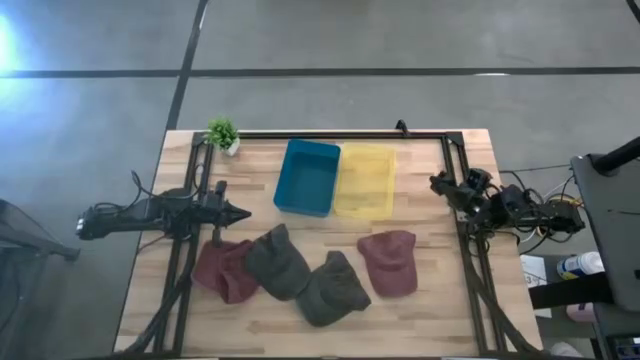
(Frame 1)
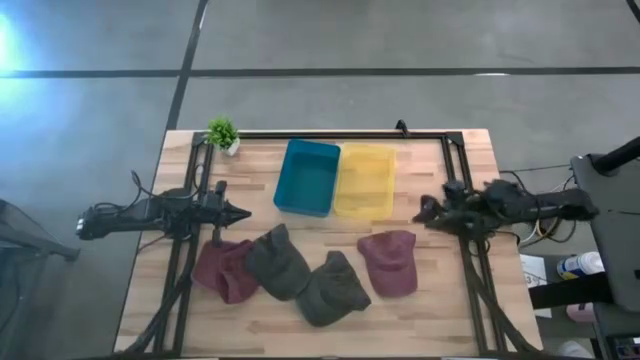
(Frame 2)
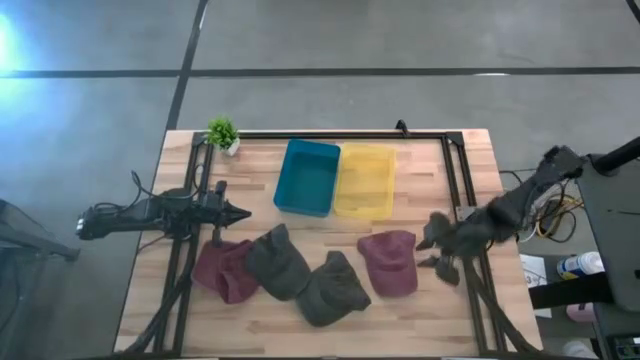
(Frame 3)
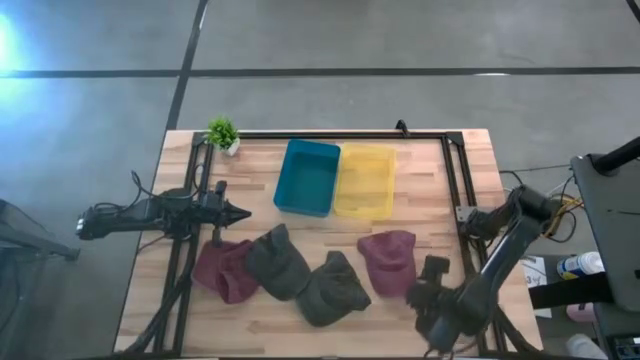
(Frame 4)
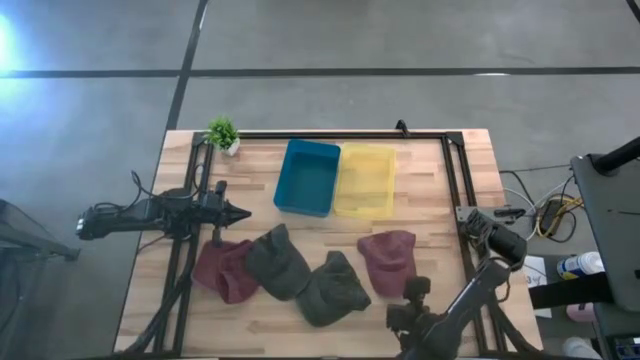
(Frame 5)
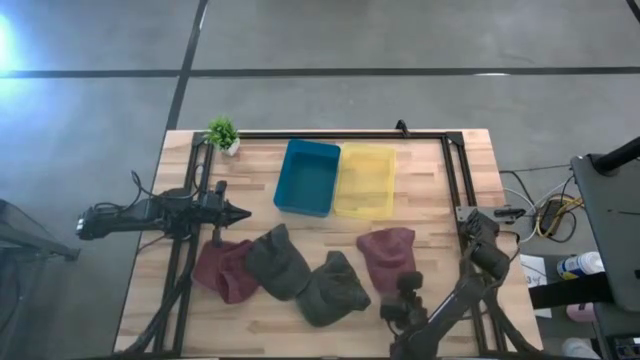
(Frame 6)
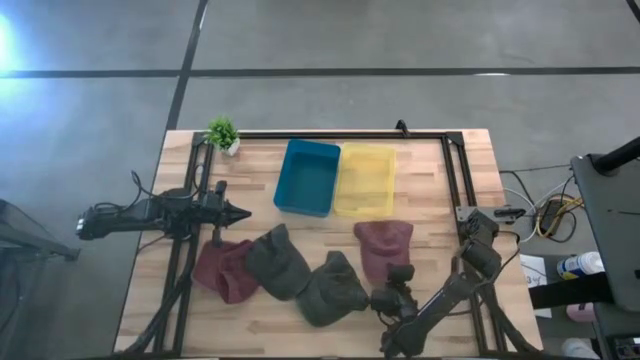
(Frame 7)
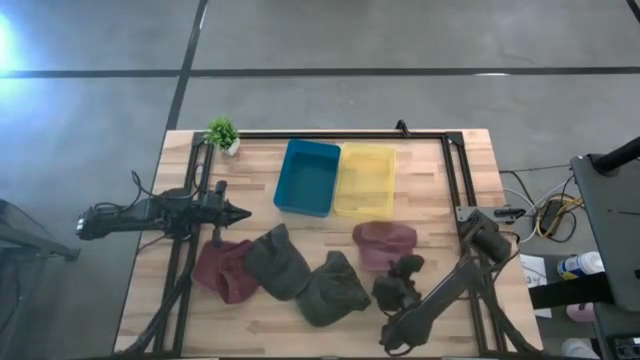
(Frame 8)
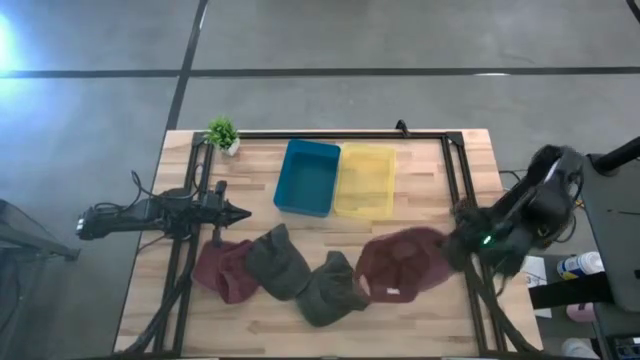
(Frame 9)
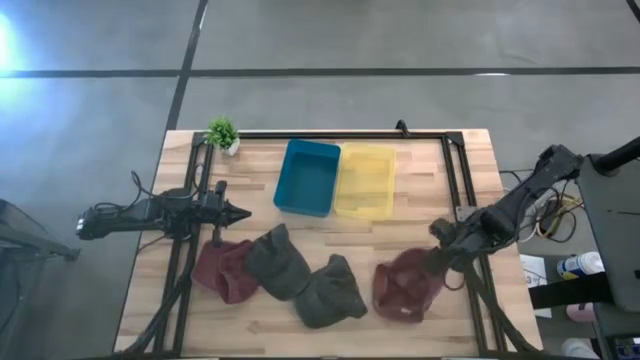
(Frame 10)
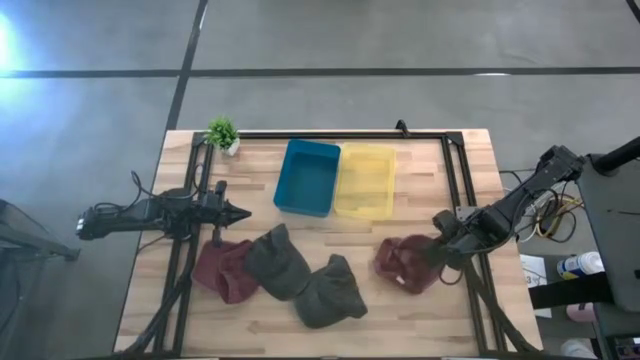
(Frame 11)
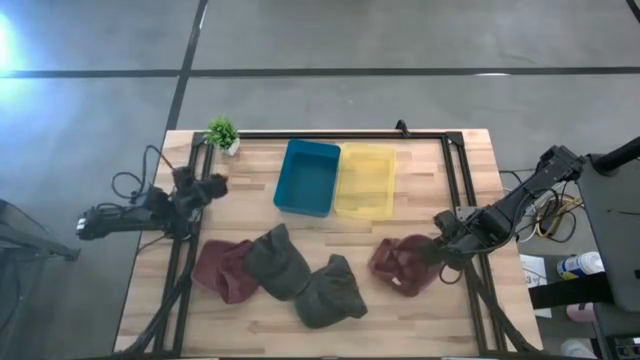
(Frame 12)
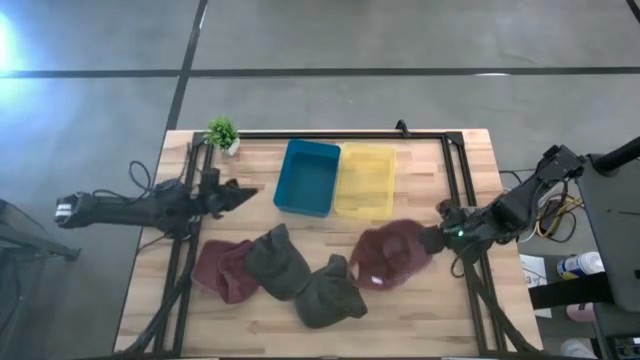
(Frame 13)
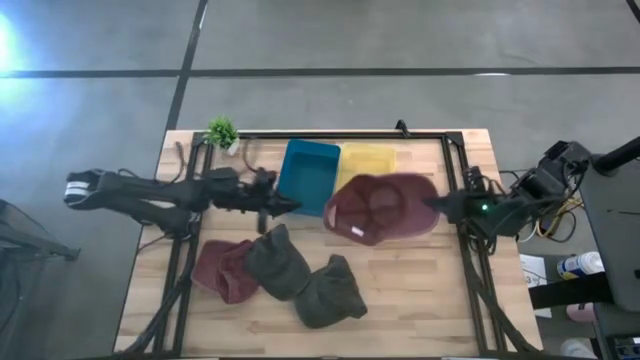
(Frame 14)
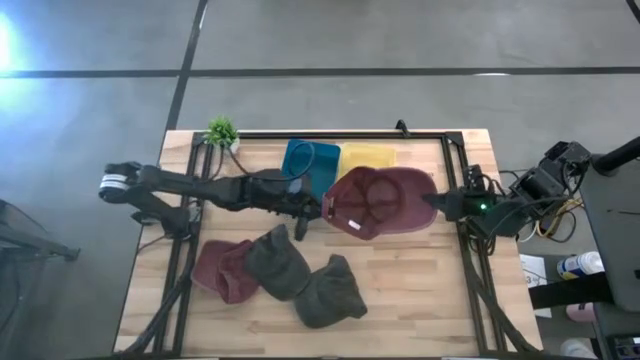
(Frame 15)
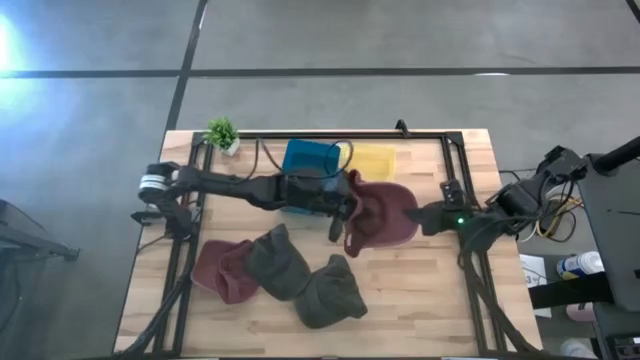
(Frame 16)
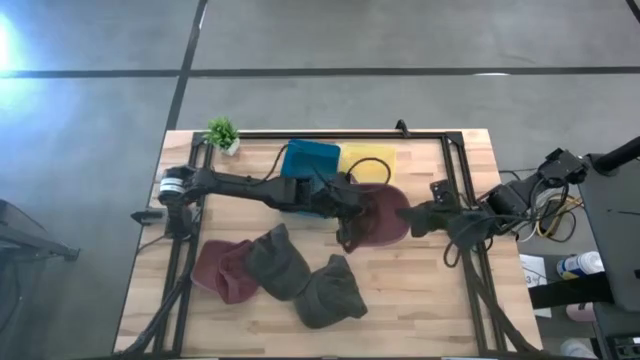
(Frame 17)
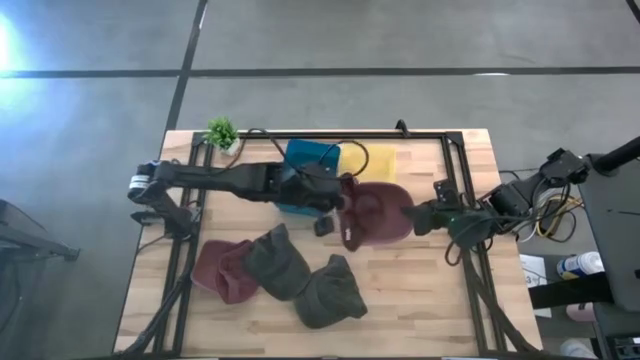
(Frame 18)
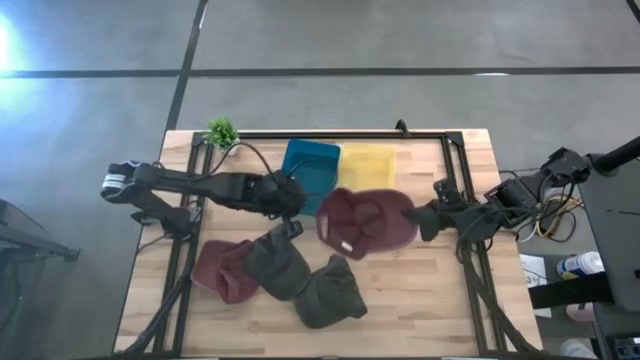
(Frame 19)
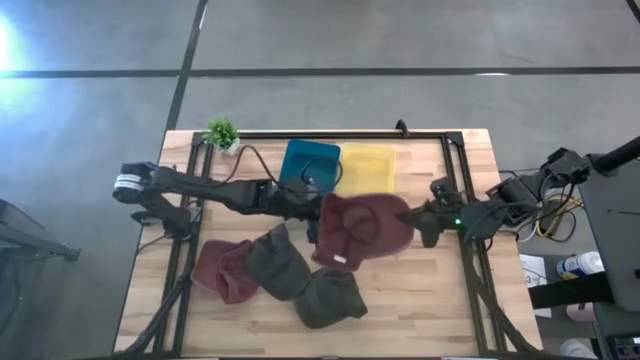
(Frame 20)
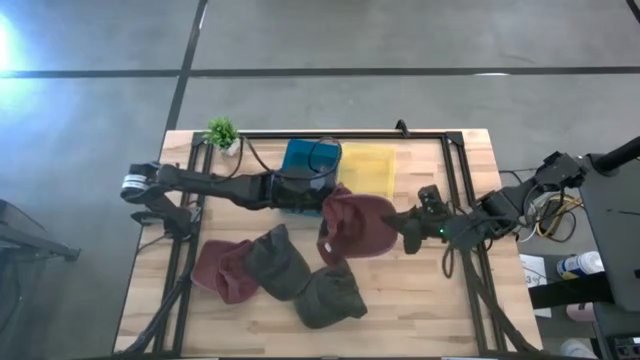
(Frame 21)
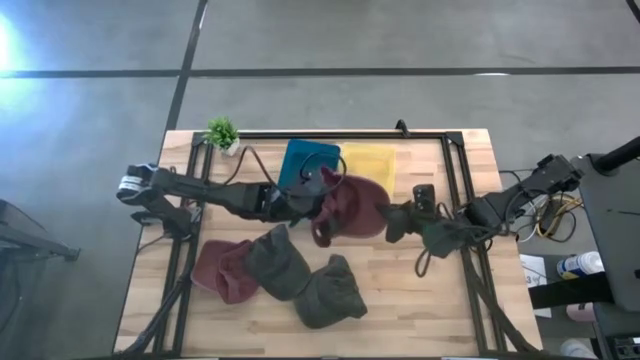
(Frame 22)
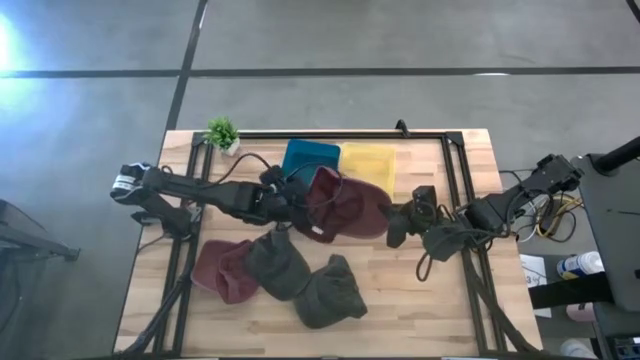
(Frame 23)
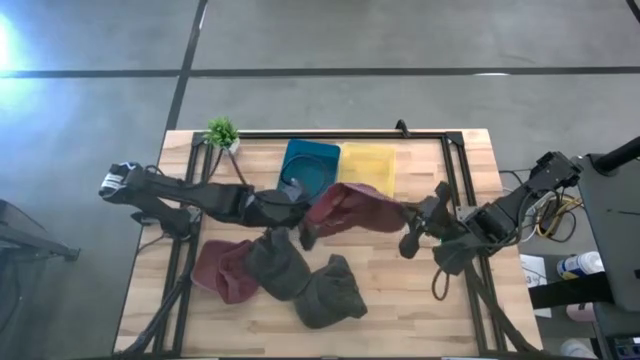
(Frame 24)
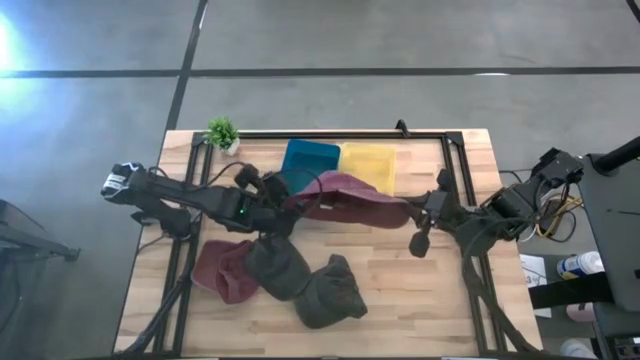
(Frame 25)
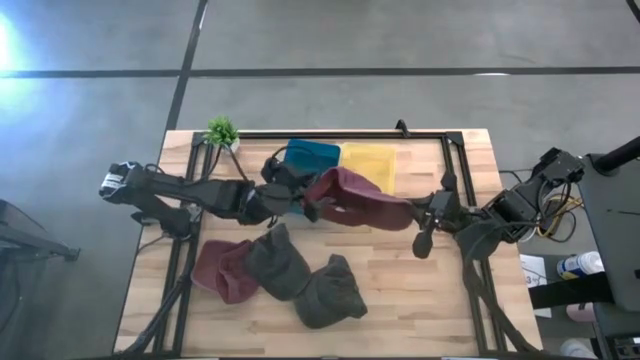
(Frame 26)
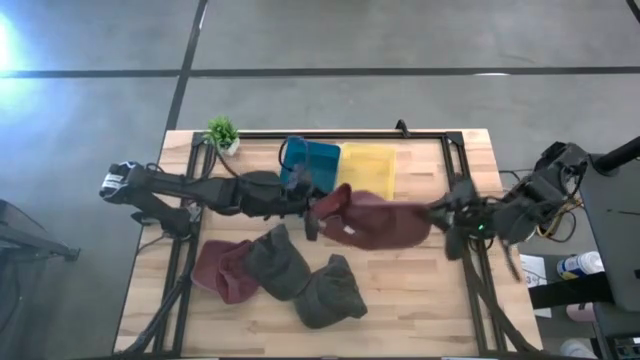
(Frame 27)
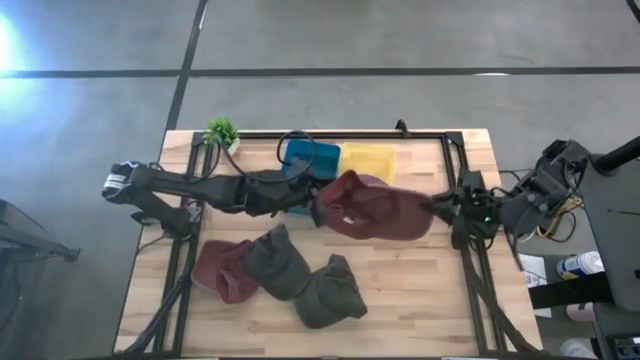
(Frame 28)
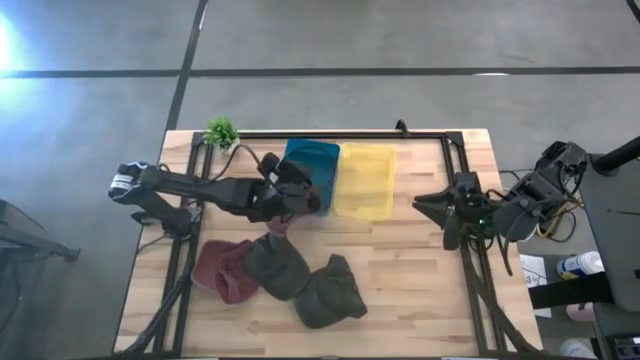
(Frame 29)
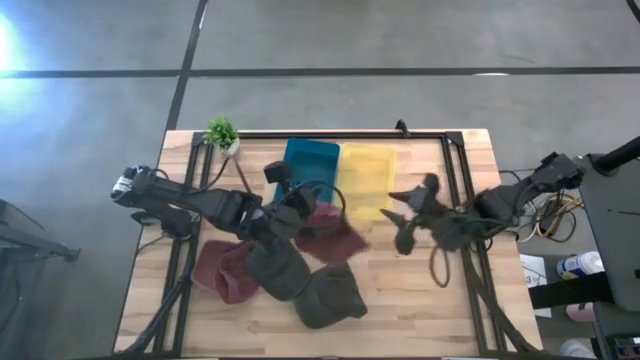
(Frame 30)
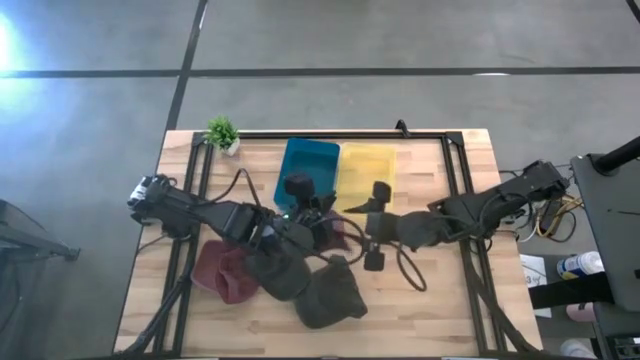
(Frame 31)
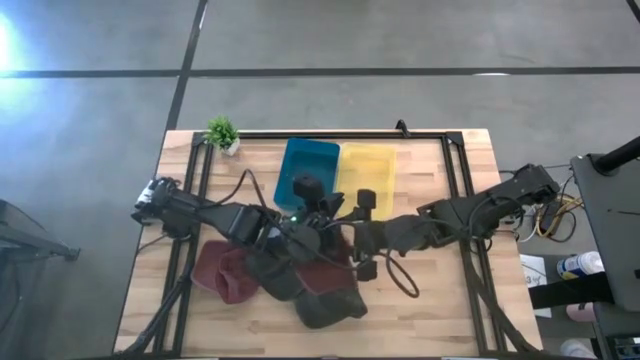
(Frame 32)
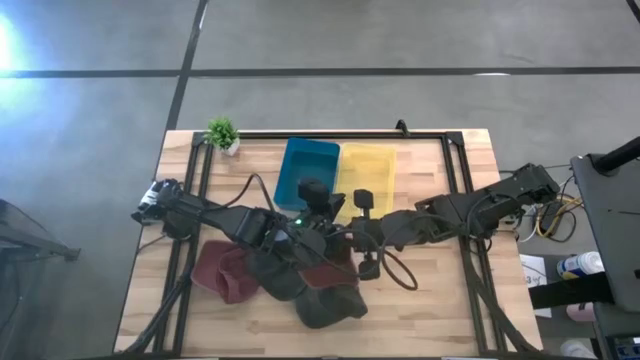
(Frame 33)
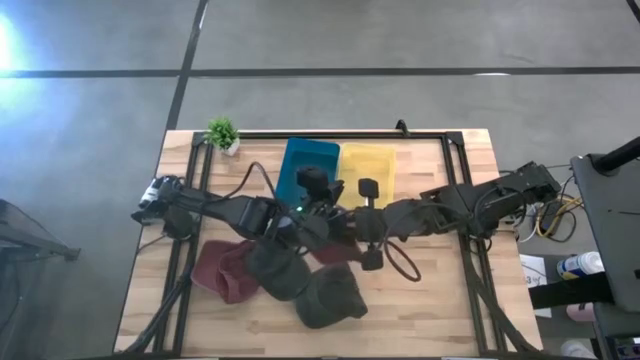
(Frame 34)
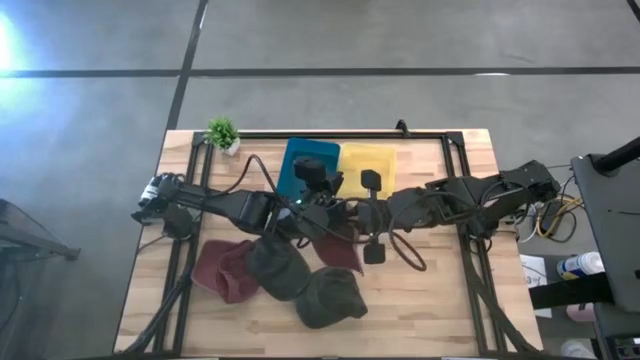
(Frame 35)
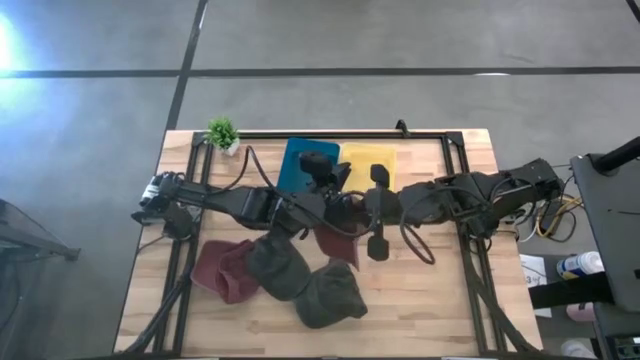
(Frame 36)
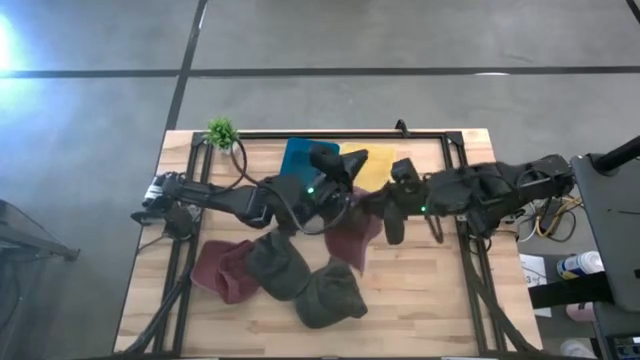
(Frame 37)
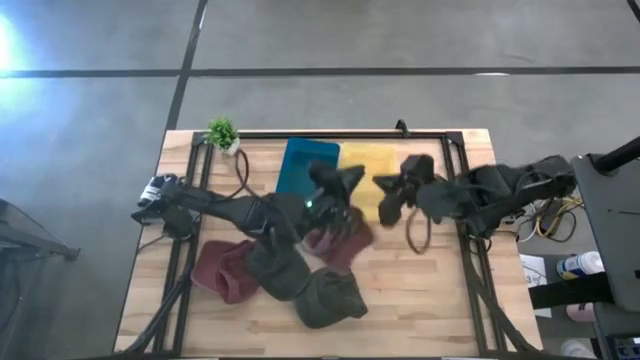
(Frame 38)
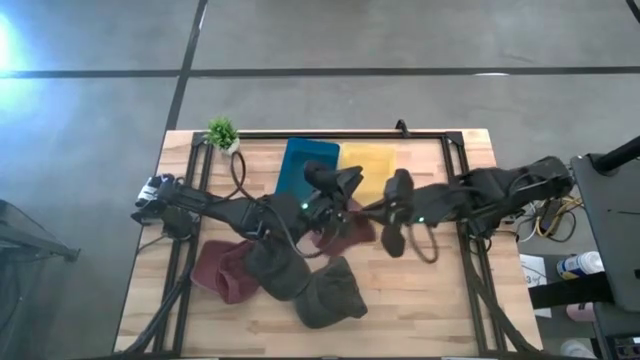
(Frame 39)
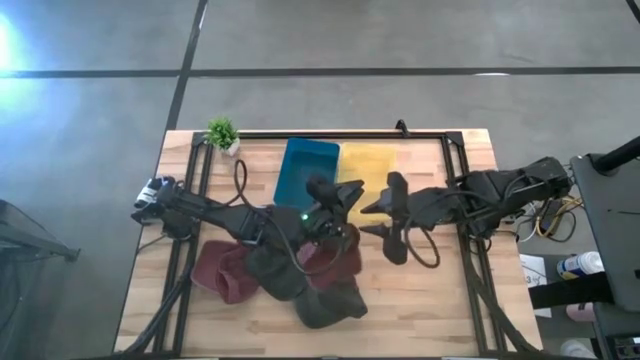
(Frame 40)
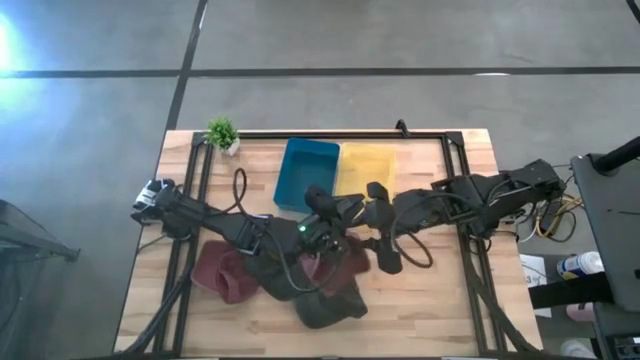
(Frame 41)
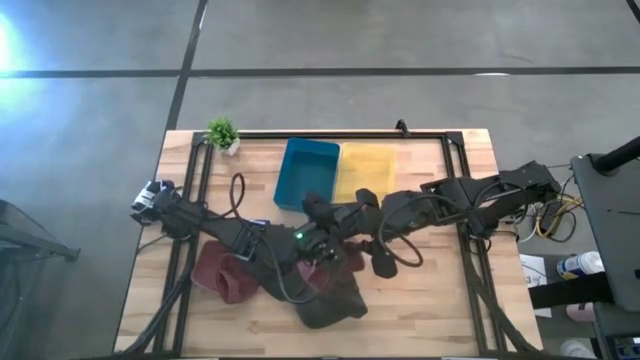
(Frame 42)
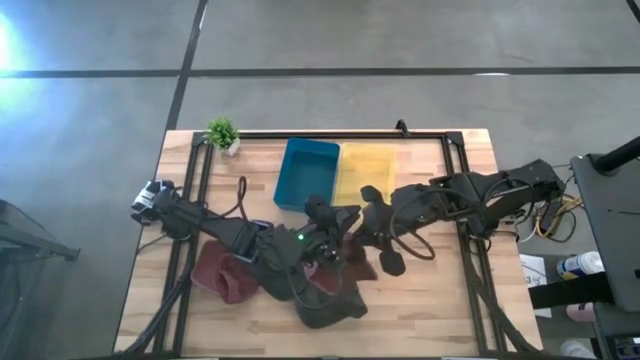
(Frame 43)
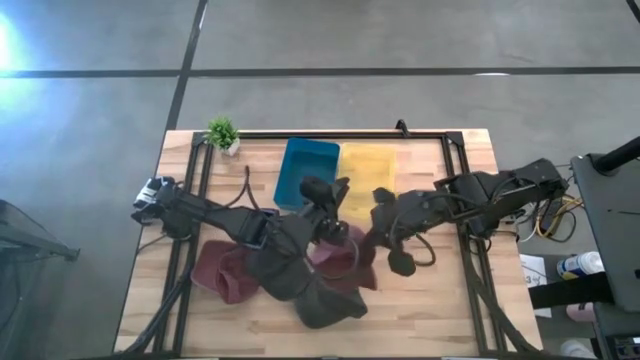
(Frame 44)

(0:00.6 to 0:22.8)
Task: Pick & Place hat
Put the right red cap into the yellow bin
